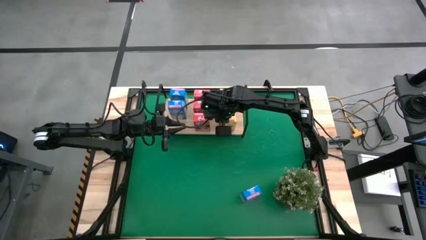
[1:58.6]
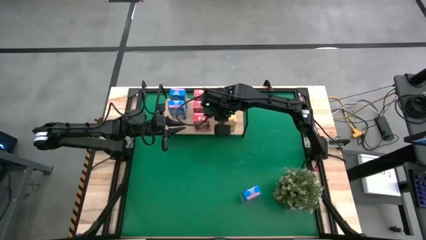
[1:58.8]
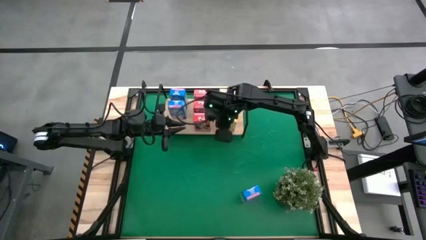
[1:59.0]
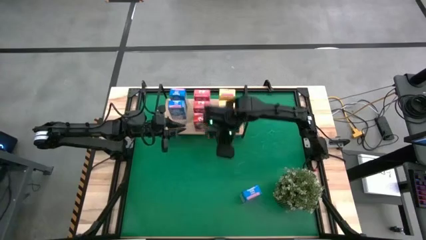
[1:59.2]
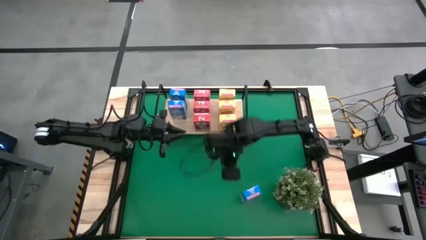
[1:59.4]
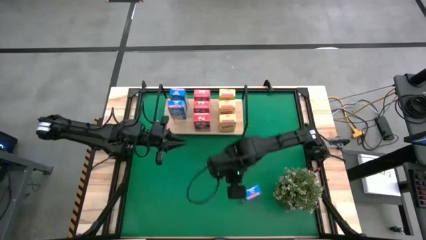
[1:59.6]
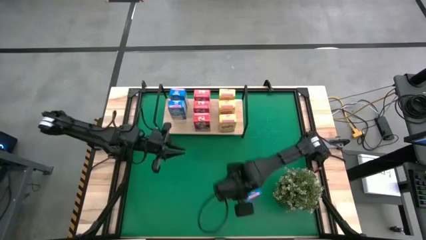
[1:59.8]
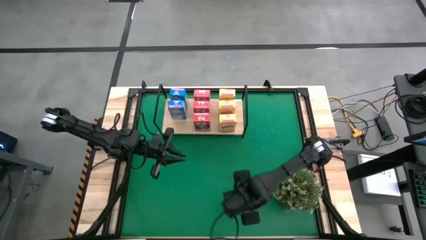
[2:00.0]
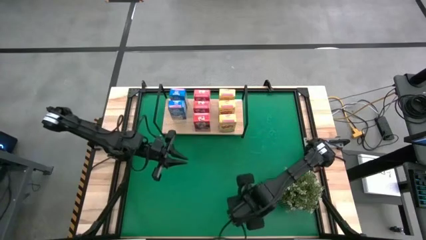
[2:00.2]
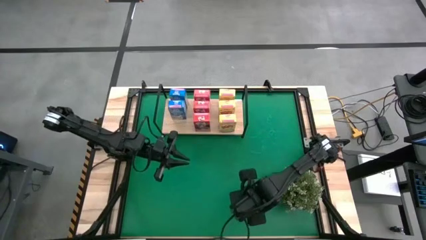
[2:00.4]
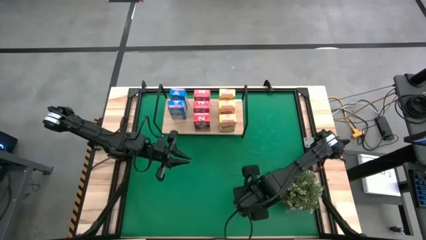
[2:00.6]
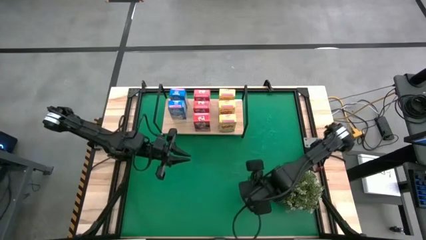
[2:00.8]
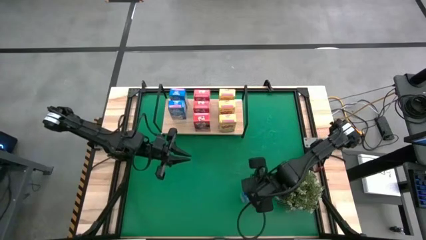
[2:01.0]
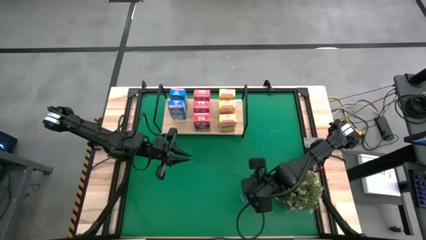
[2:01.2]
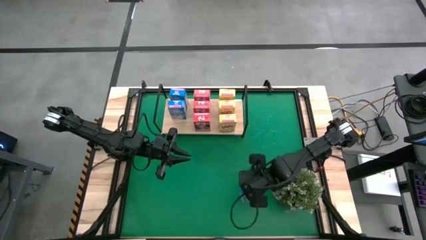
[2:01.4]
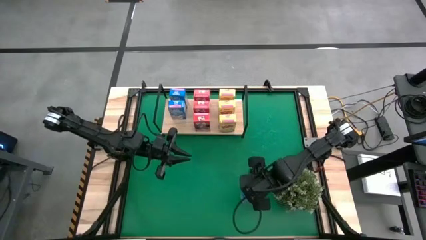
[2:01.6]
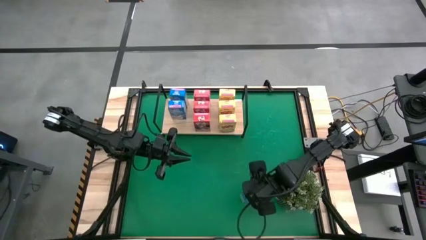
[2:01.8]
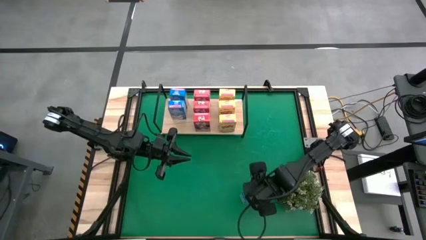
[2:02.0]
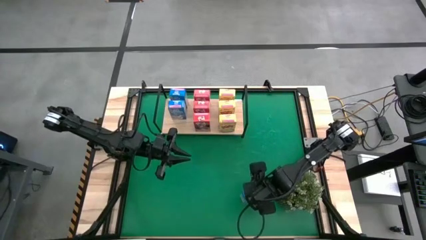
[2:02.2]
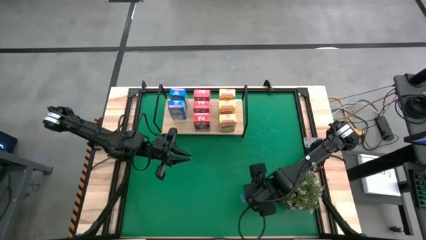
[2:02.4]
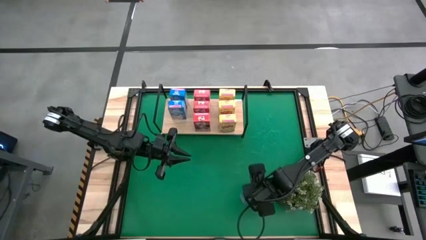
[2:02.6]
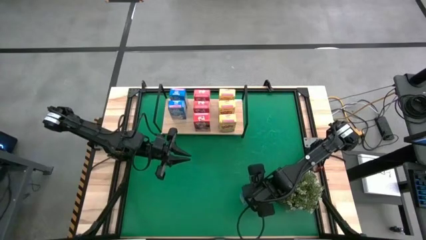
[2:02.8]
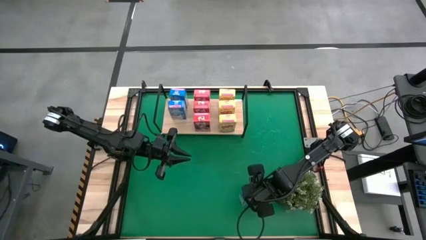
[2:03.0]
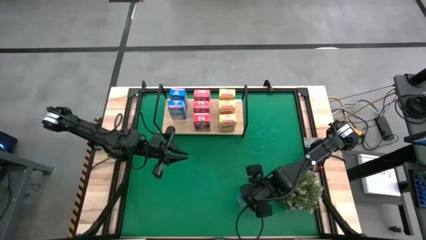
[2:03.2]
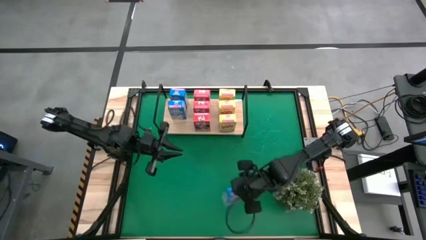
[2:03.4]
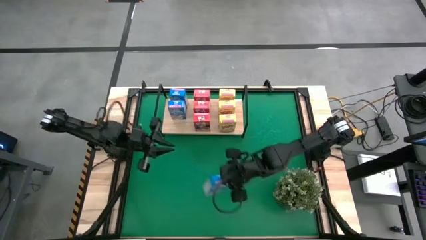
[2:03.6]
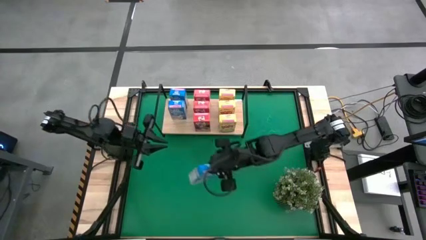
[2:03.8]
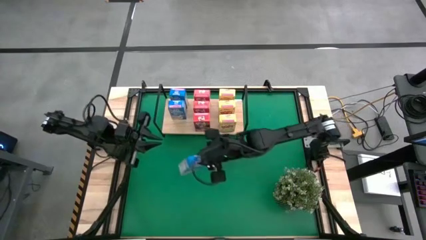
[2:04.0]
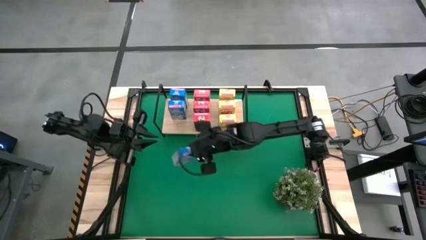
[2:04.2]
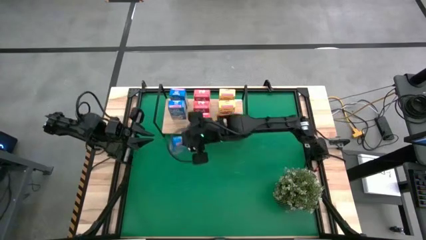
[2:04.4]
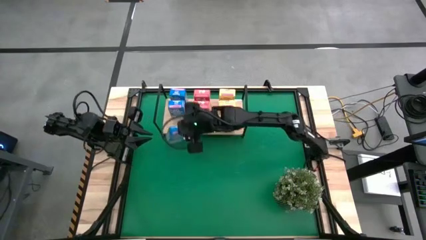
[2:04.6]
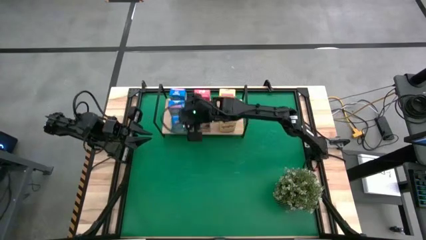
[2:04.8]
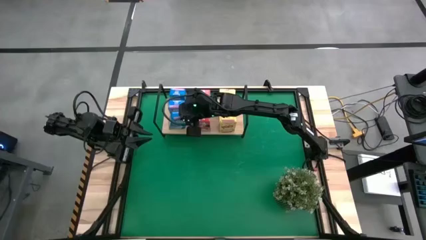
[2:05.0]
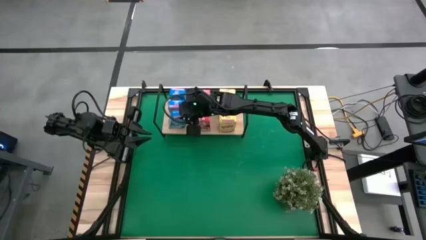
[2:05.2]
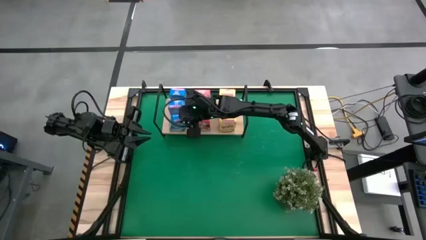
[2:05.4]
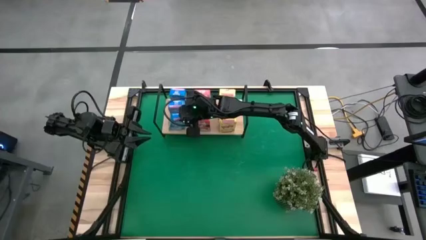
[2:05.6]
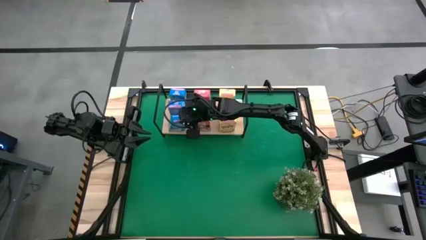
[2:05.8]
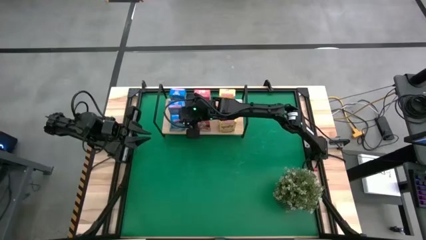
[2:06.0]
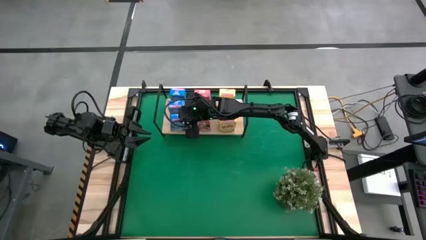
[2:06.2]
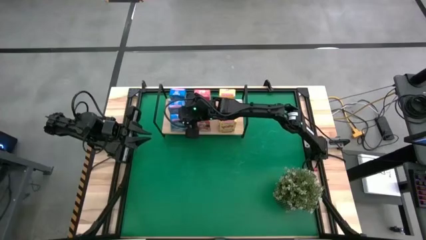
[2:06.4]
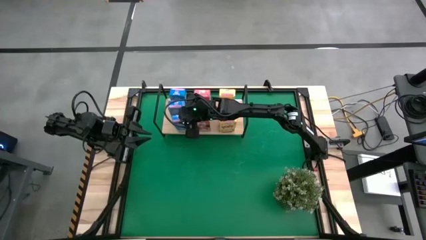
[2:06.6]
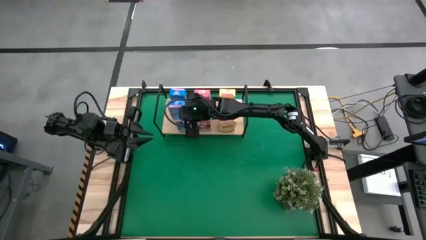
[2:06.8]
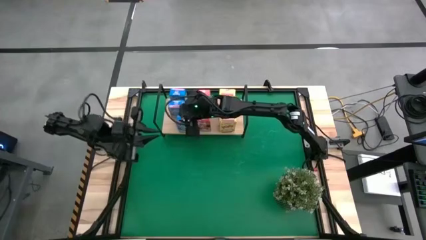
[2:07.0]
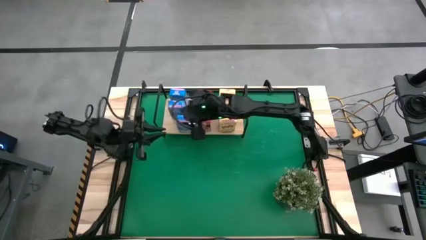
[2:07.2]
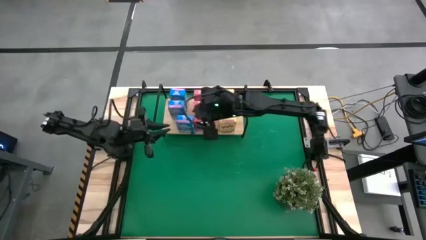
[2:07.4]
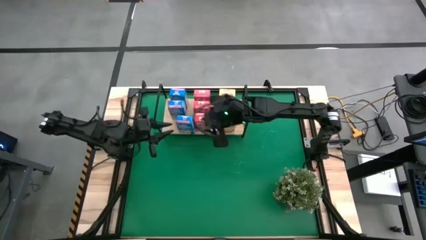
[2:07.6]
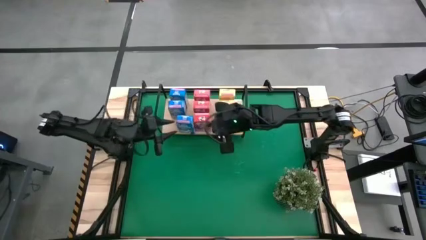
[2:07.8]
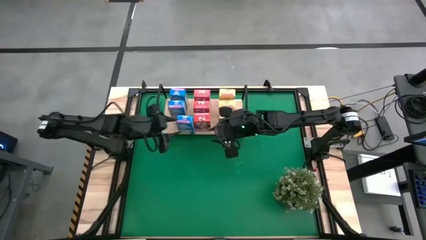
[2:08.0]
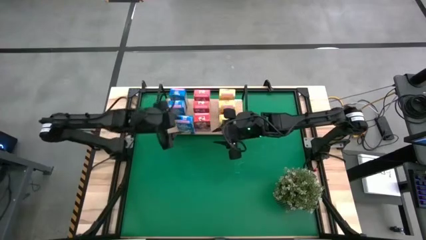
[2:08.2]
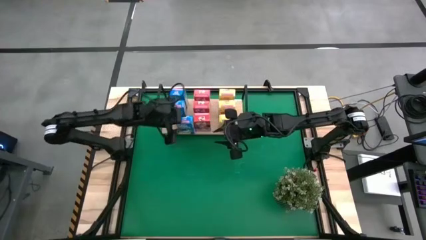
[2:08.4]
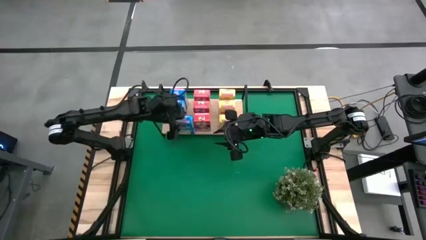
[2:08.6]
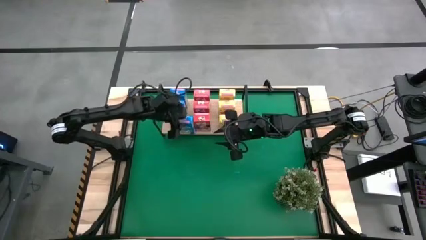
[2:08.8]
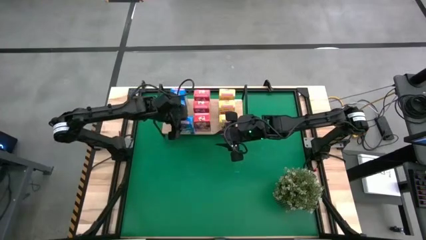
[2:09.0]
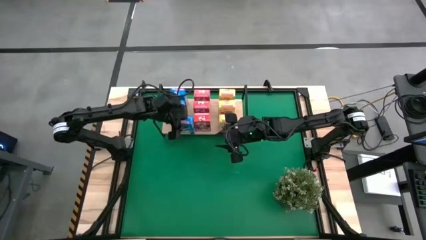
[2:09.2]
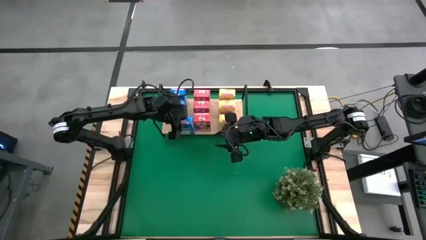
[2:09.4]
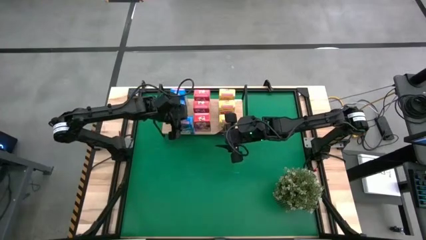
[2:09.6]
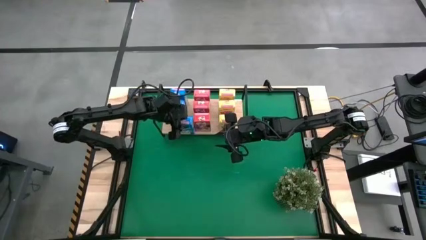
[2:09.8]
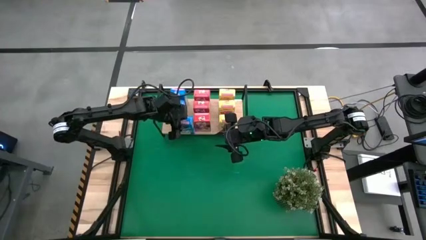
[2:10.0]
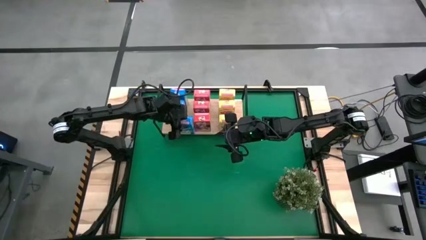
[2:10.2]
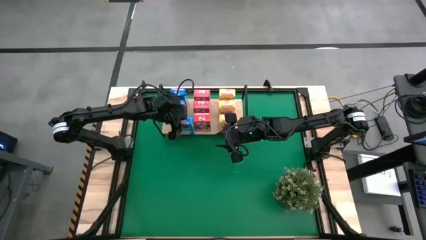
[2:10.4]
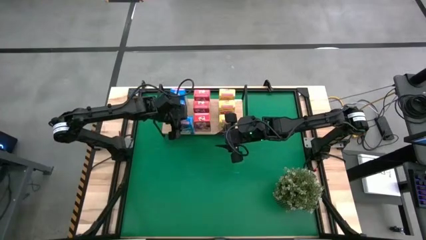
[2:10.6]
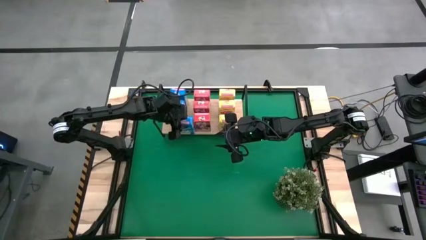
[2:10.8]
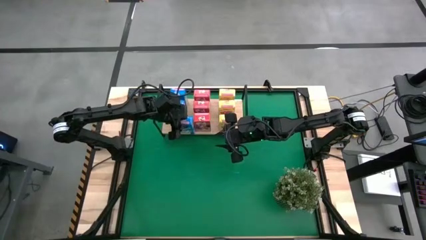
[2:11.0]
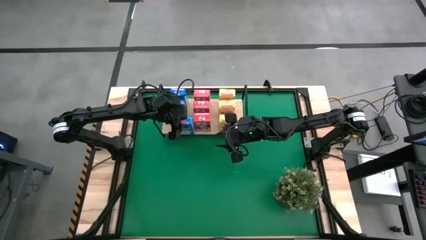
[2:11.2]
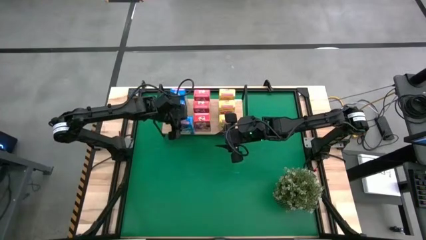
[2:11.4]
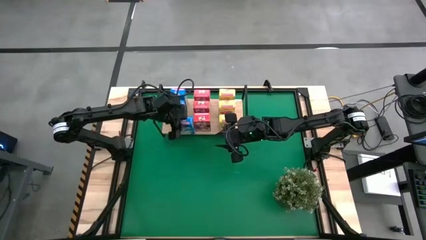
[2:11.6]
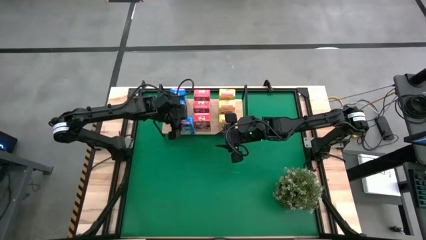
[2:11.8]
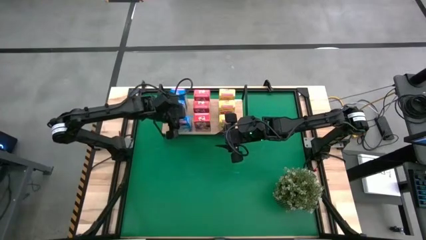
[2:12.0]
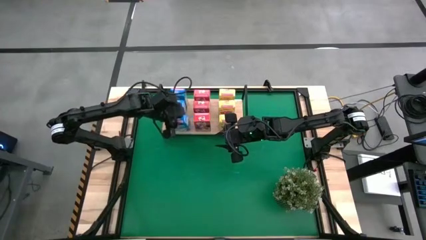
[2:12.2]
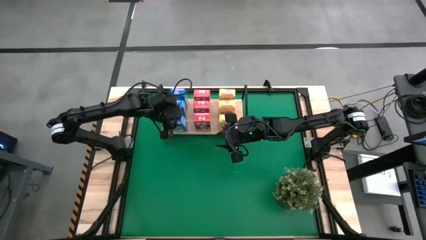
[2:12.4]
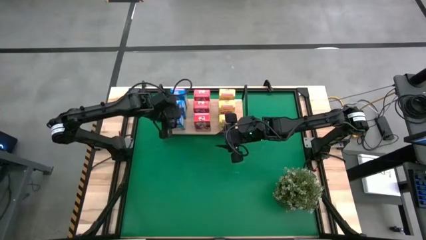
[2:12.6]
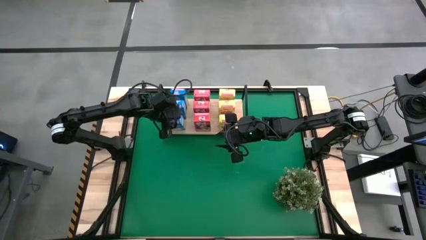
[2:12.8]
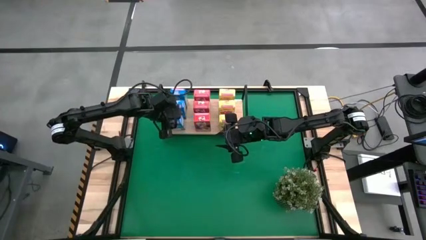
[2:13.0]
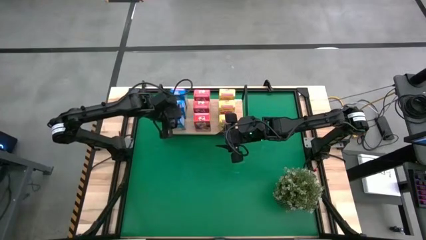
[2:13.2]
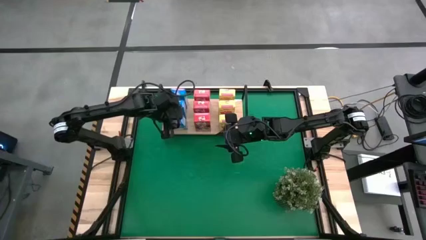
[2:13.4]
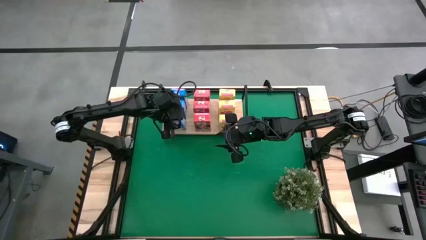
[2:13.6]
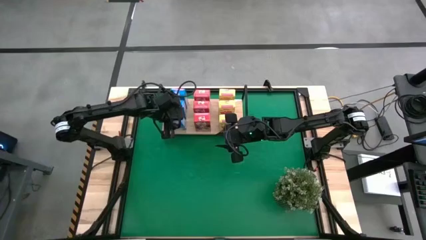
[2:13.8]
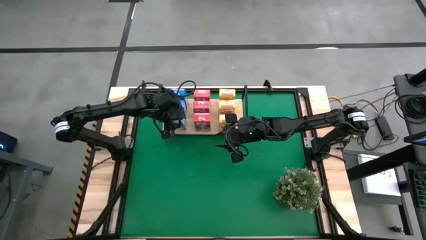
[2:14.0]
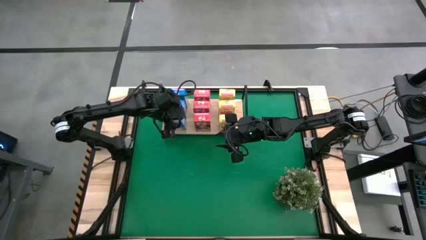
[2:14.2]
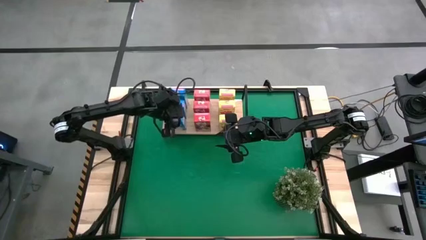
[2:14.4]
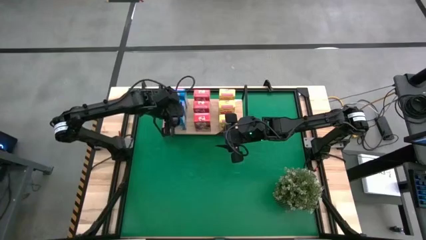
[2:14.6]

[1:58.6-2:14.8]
Task: Stack cereal on shelf
Put the blue cereal box on the shelf aligned with the other blue cereal box
